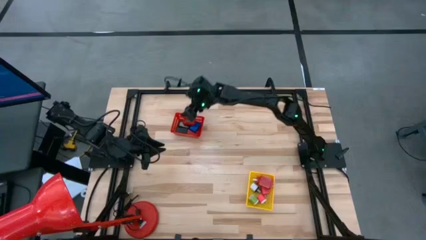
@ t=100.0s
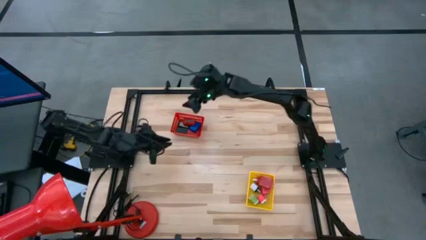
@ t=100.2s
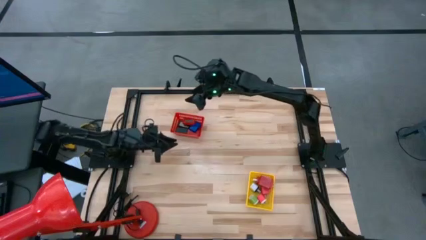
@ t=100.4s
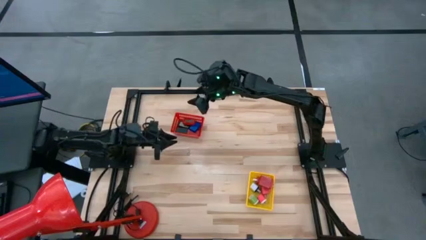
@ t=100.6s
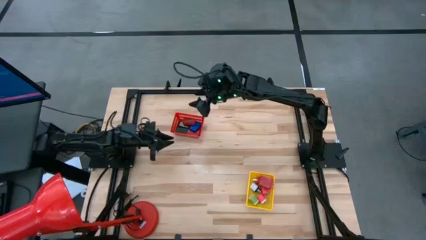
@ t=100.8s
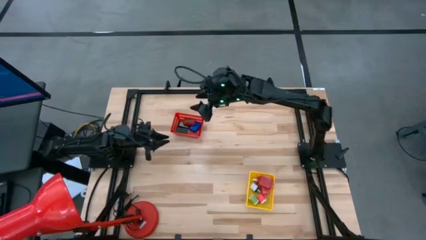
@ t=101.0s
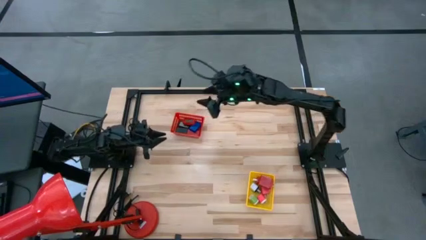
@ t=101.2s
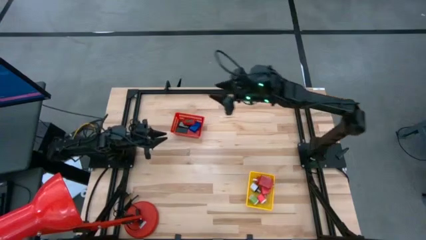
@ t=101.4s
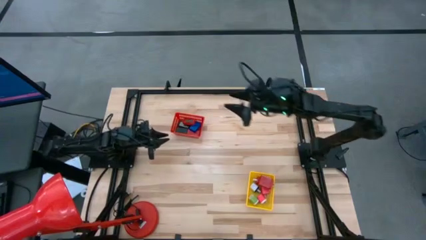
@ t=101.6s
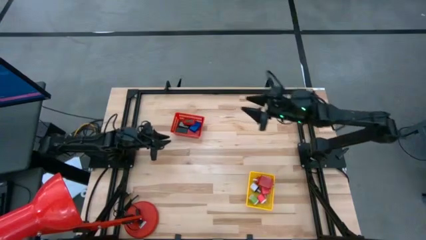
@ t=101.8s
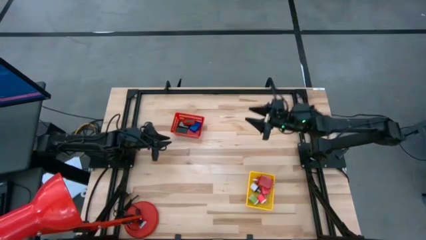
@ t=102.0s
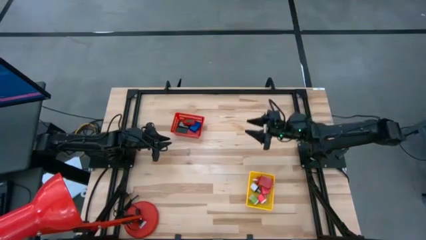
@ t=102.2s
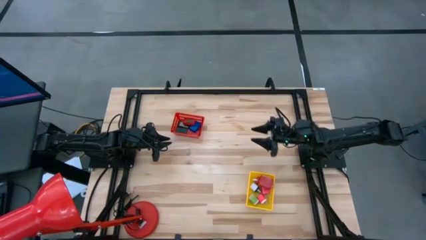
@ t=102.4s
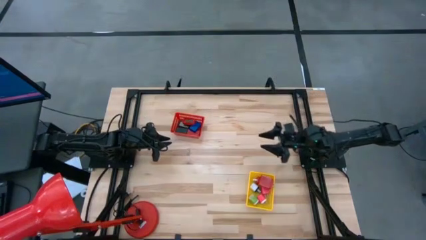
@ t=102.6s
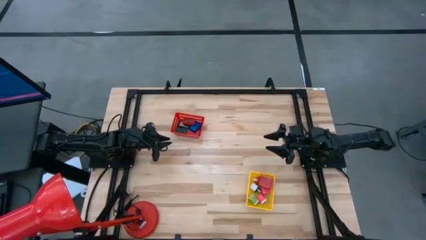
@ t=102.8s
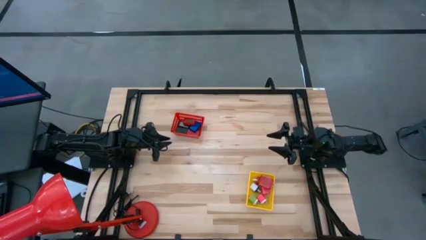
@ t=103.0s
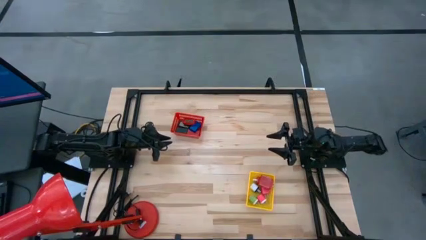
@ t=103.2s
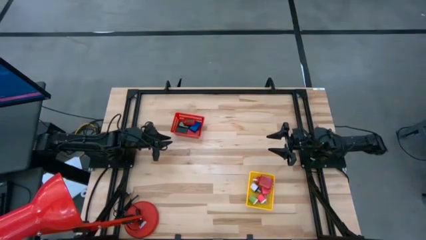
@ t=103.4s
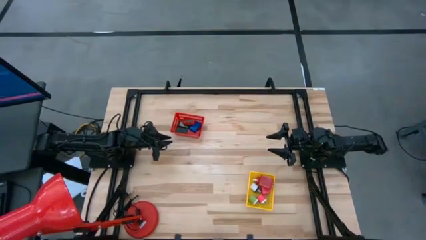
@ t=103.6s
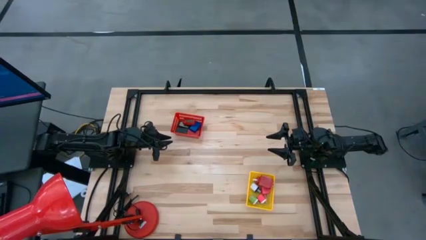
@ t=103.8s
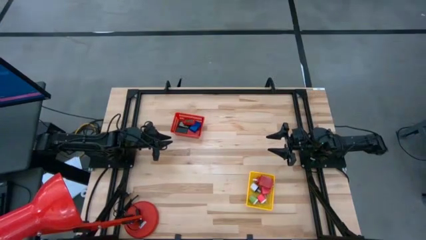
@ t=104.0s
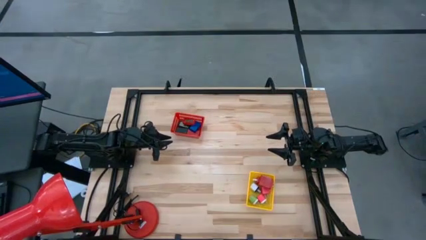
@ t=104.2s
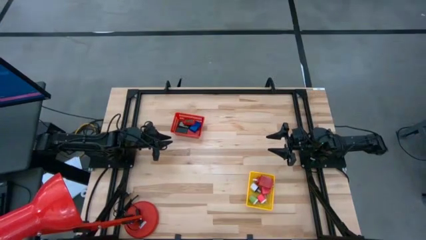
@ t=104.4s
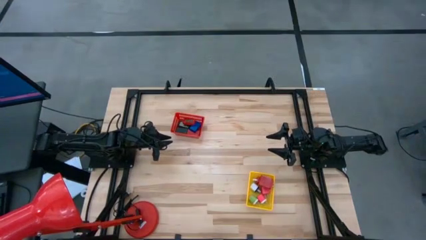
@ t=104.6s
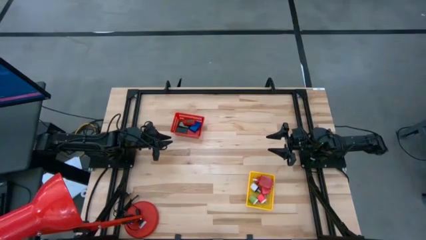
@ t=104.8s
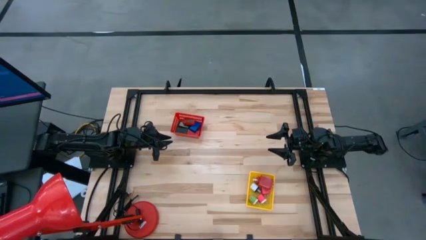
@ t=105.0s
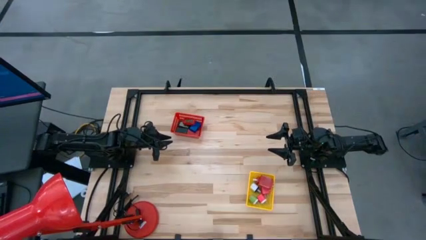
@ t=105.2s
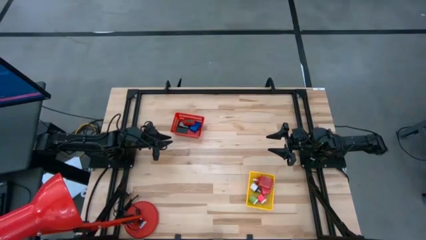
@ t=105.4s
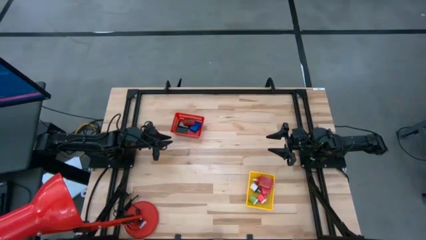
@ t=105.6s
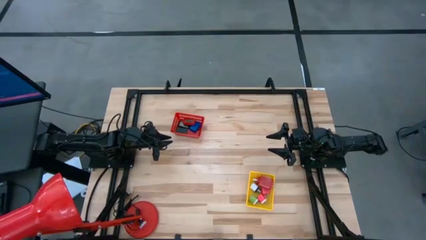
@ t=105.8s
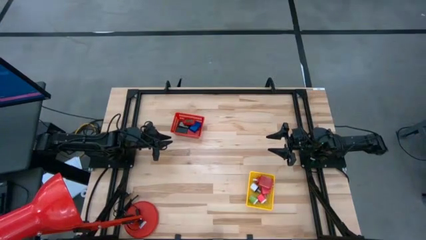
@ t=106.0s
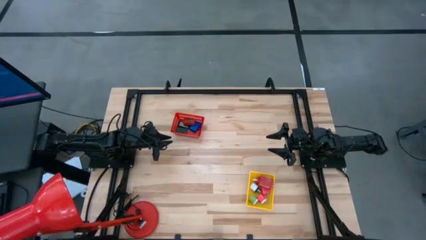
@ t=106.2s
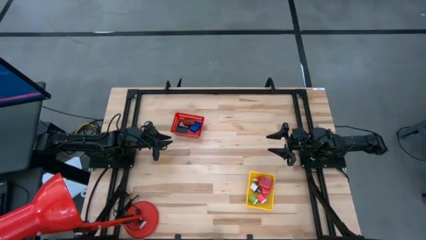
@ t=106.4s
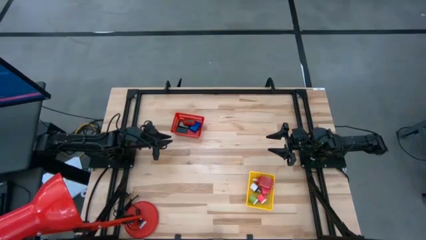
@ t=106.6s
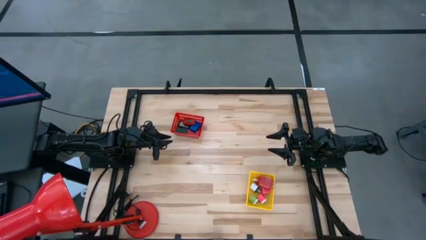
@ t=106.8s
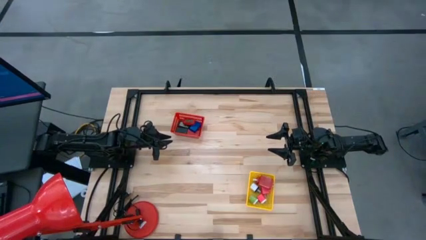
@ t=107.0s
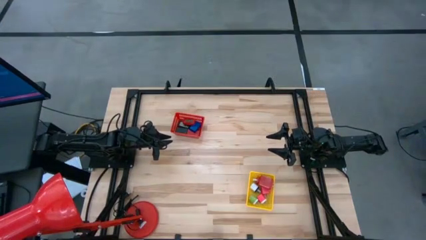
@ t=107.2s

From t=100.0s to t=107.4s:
Task: Pick & Place Office items
Return to Home Position
